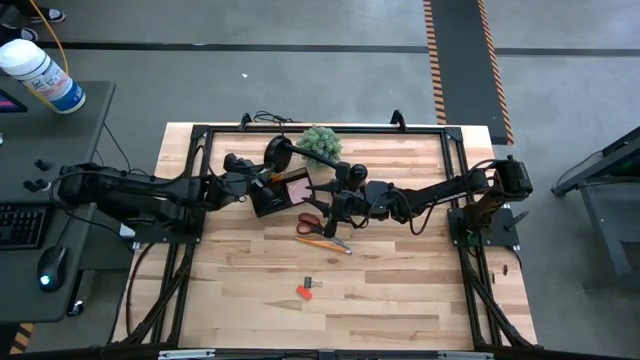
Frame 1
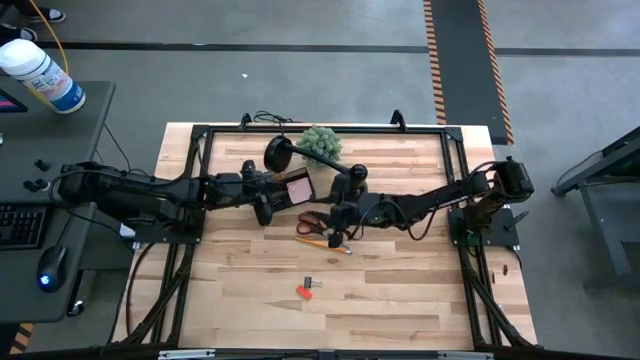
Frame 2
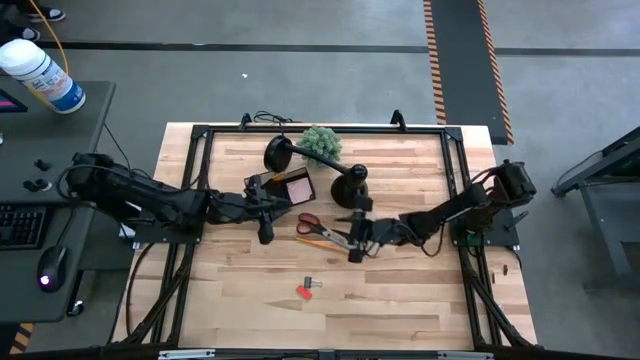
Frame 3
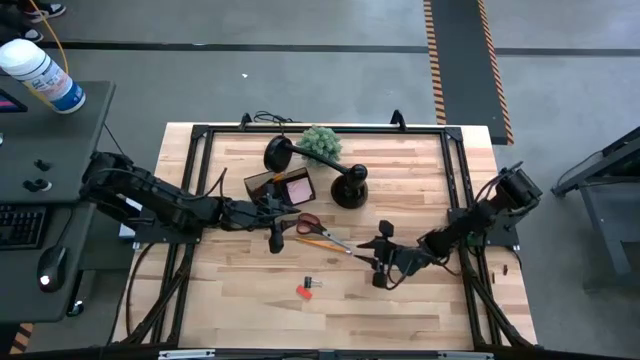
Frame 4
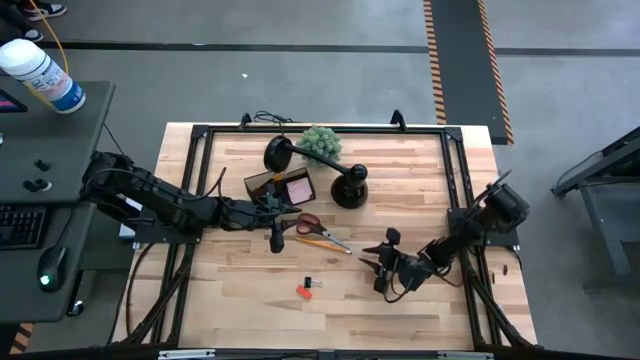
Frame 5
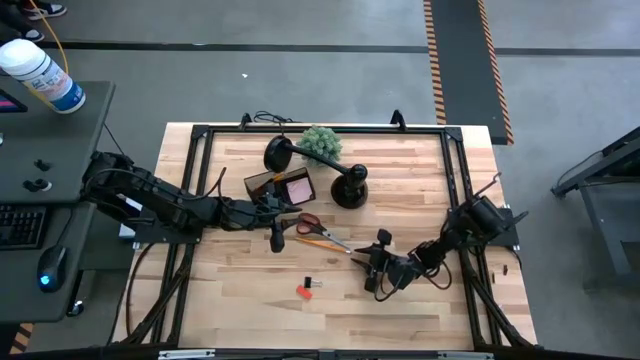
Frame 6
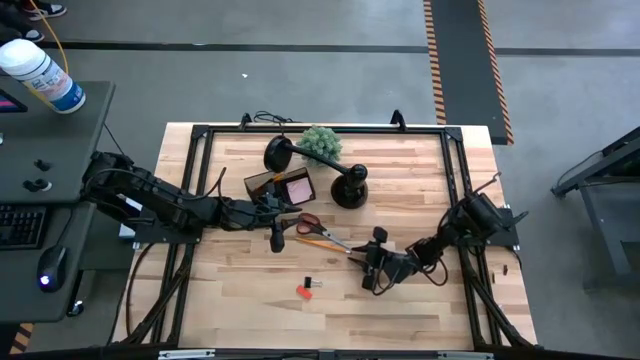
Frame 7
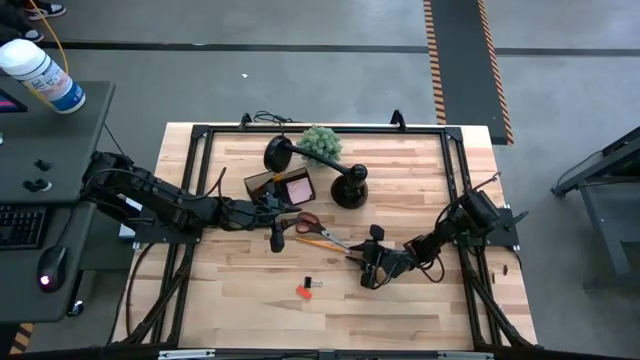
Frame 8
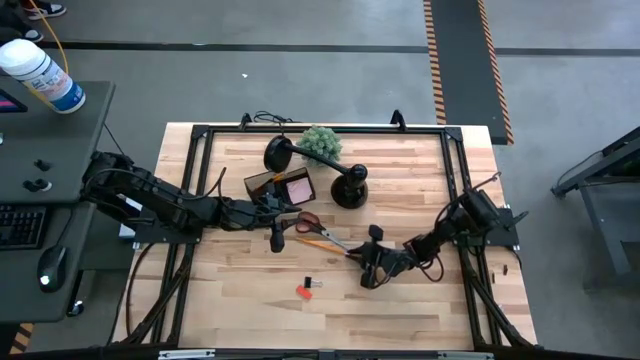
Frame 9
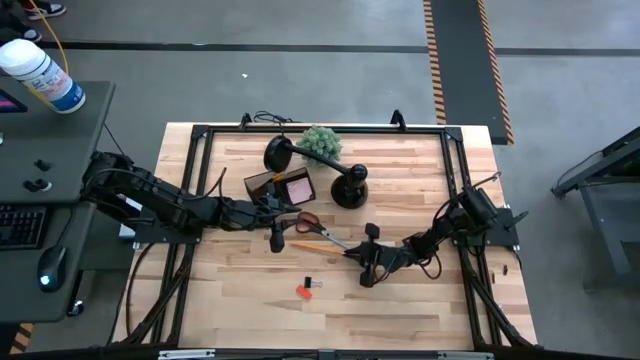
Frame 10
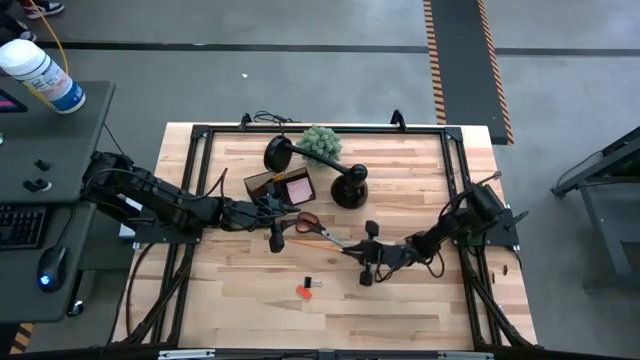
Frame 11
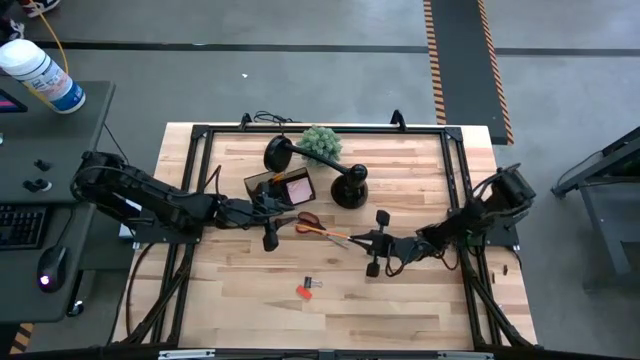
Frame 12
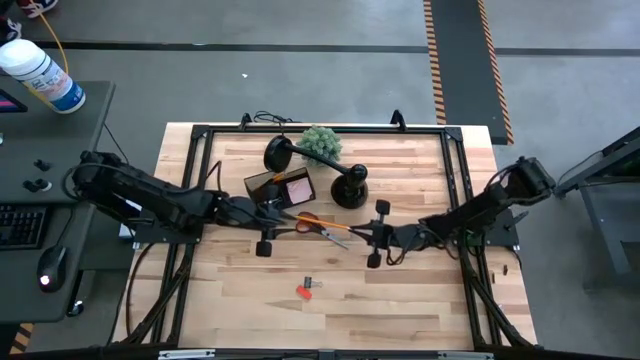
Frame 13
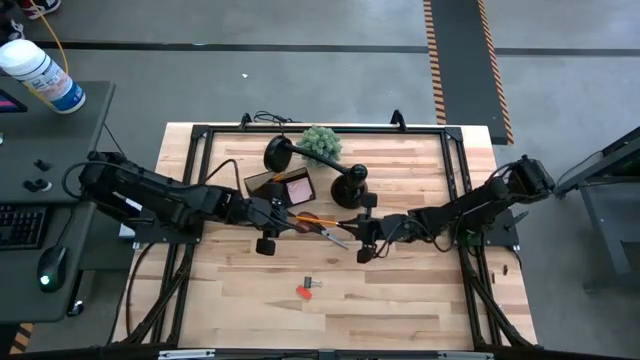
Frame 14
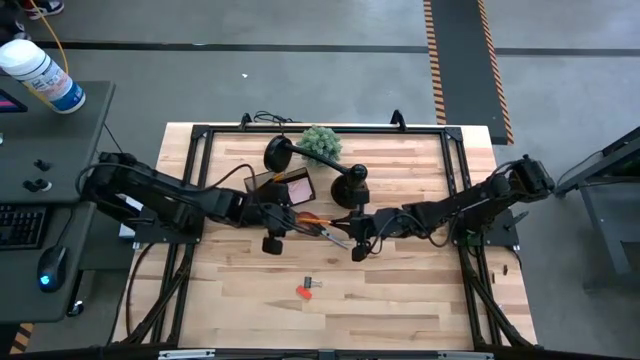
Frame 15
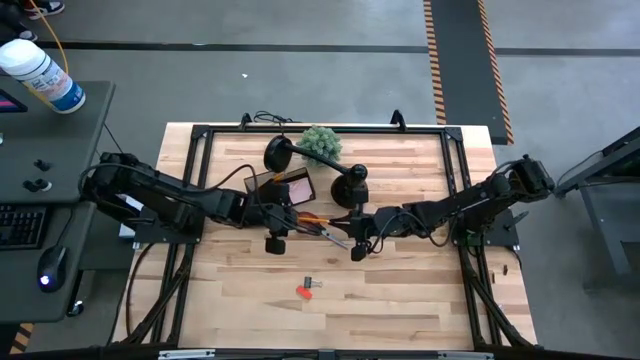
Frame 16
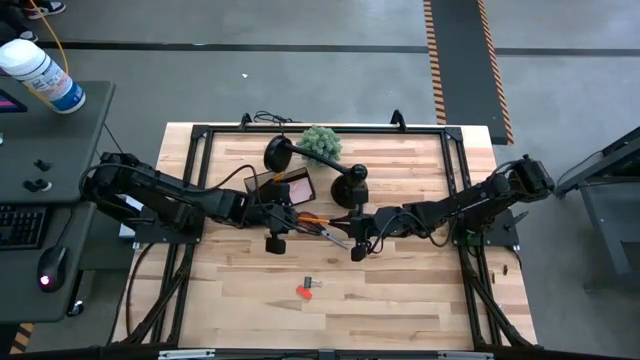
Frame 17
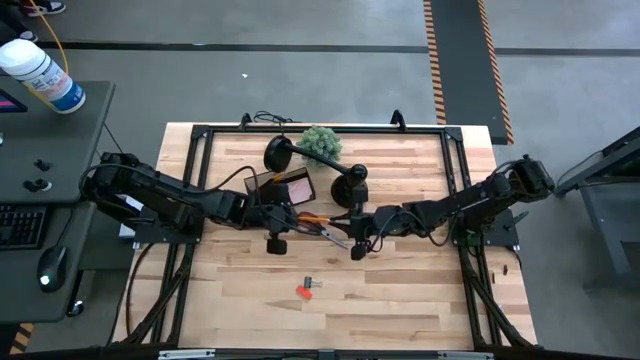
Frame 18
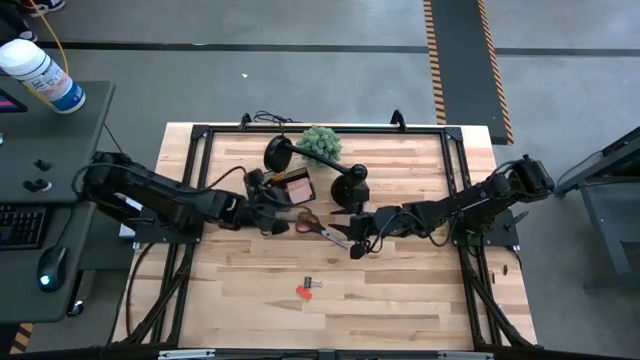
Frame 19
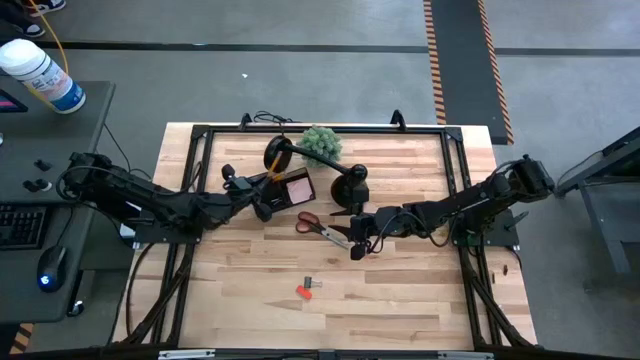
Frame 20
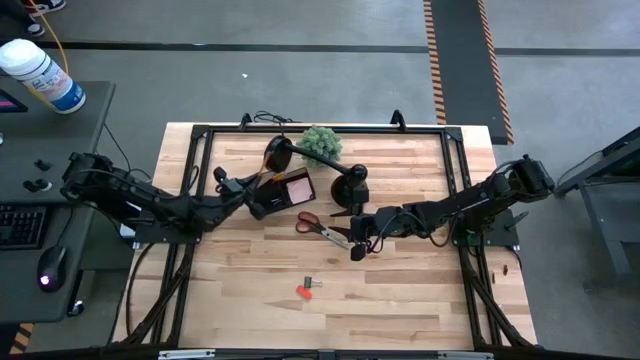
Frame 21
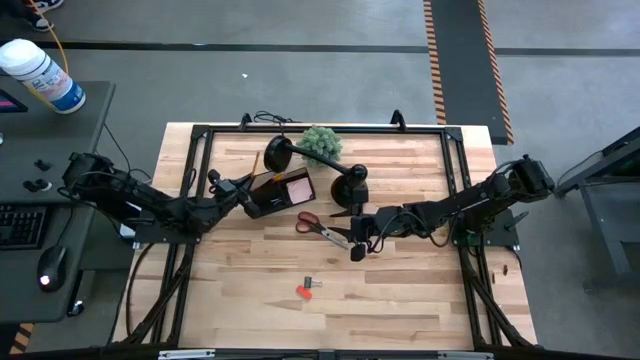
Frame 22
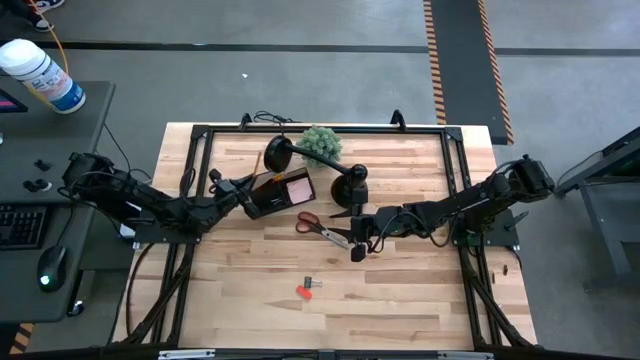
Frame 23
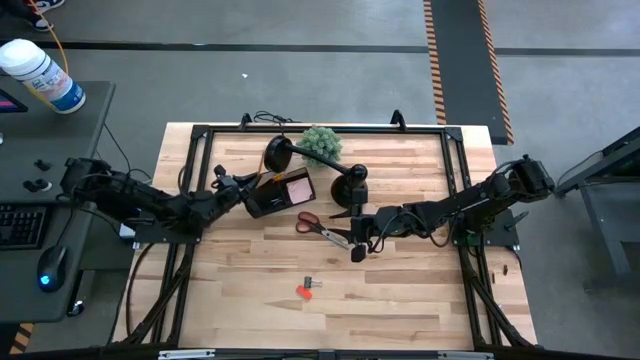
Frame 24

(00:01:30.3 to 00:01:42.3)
Task: Pick and place office supplies into organizer
Put the orange pencil into the black desk organizer

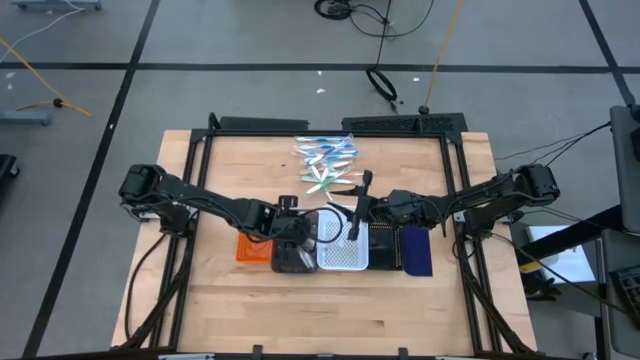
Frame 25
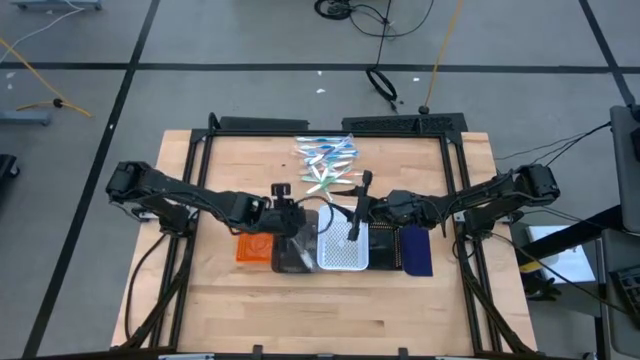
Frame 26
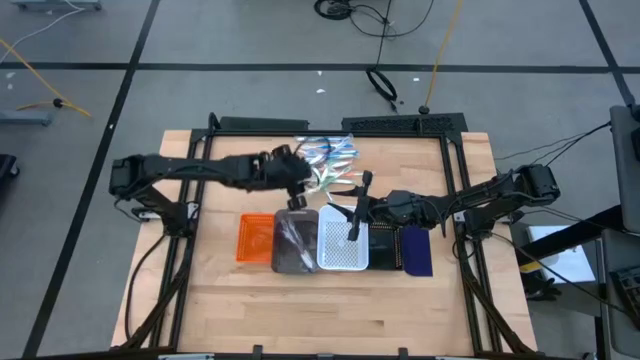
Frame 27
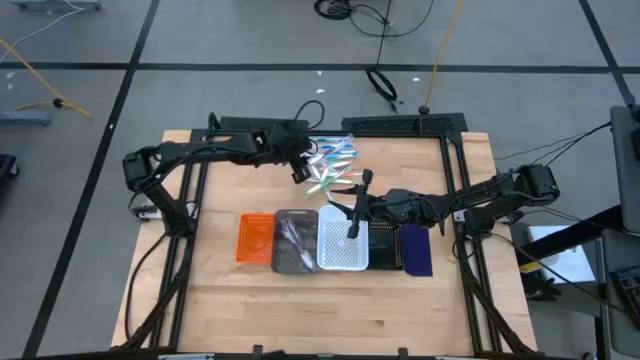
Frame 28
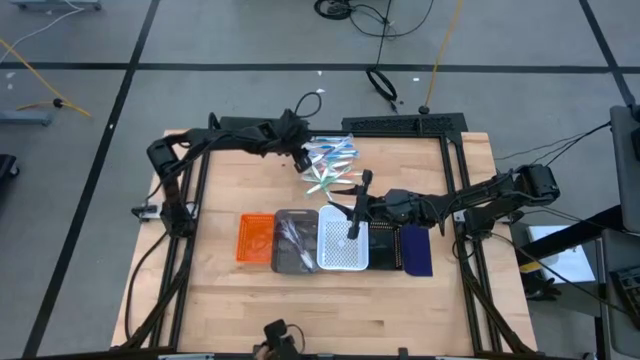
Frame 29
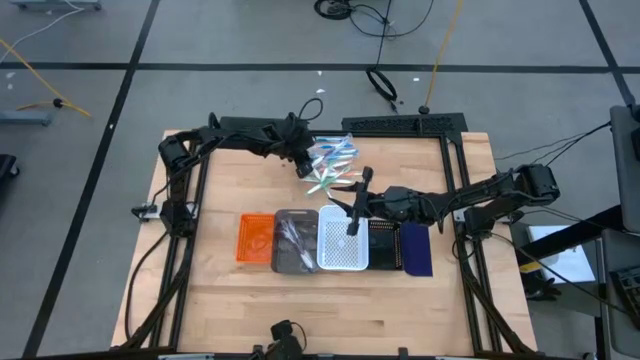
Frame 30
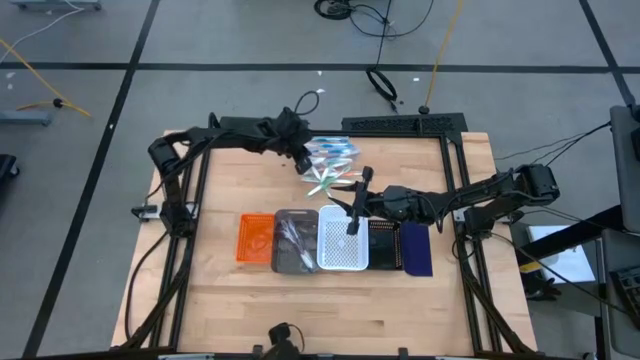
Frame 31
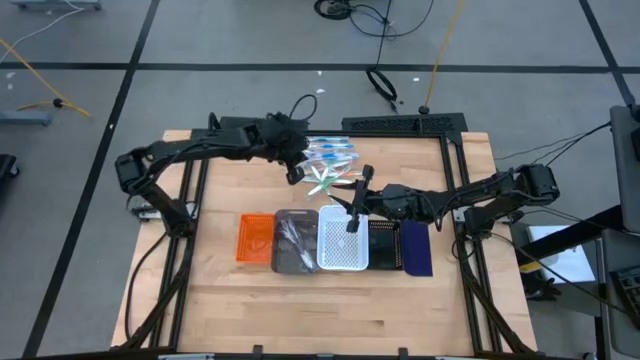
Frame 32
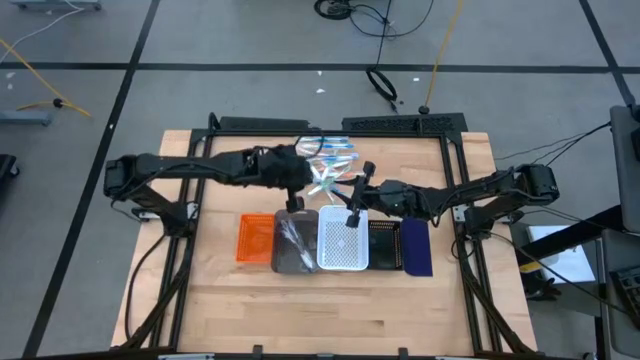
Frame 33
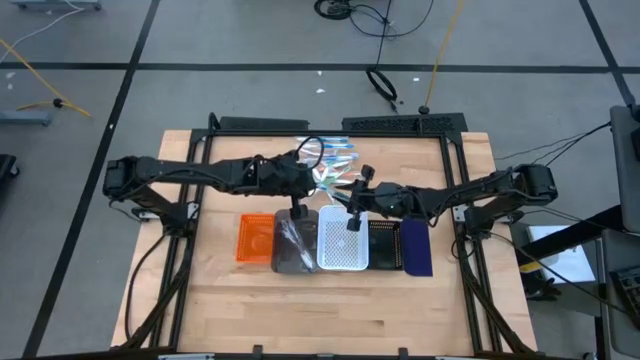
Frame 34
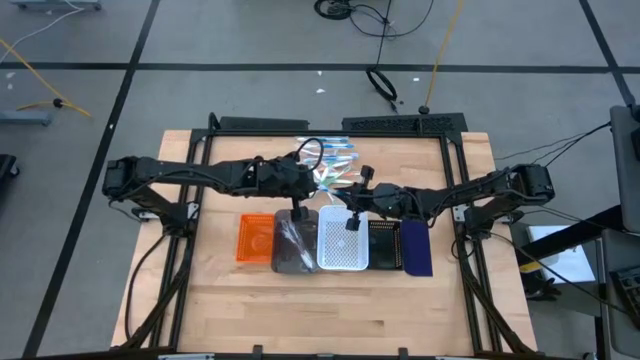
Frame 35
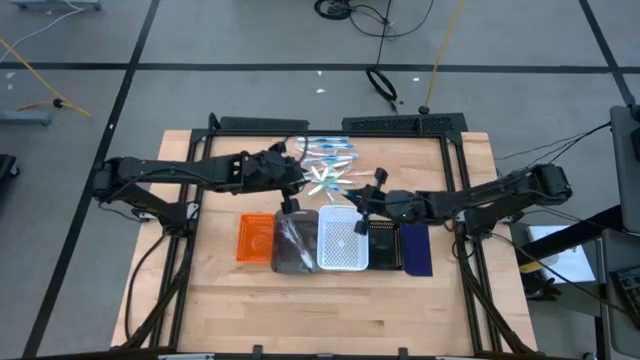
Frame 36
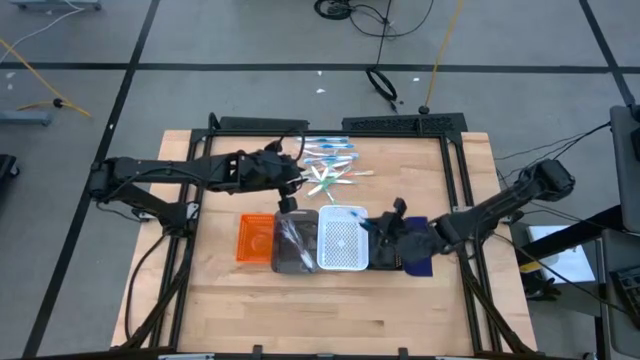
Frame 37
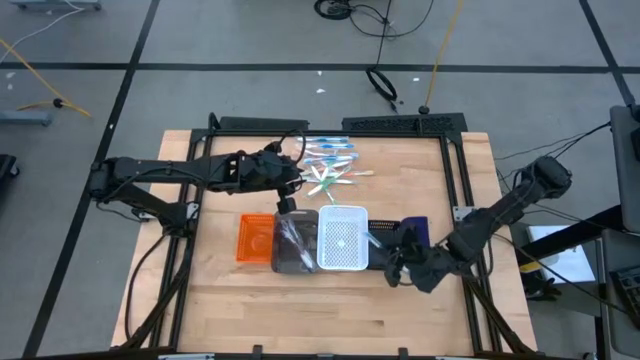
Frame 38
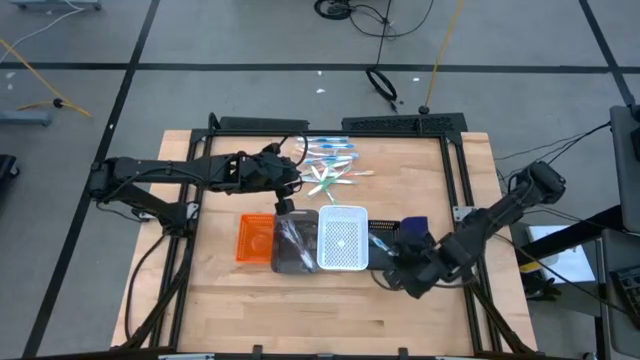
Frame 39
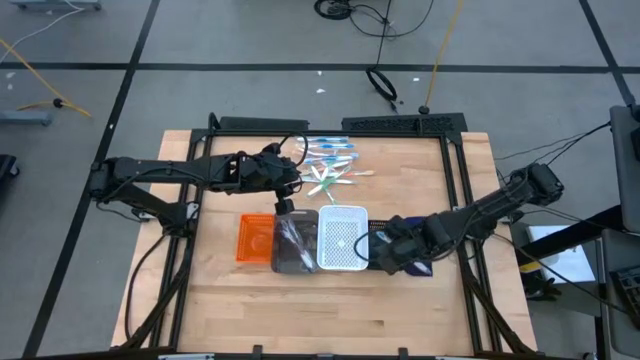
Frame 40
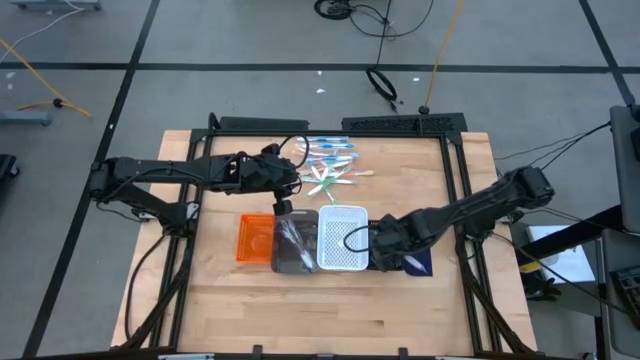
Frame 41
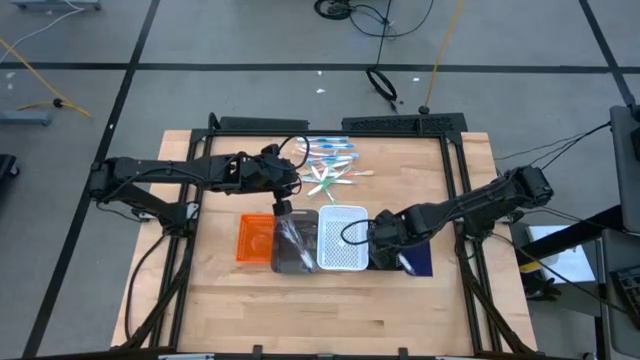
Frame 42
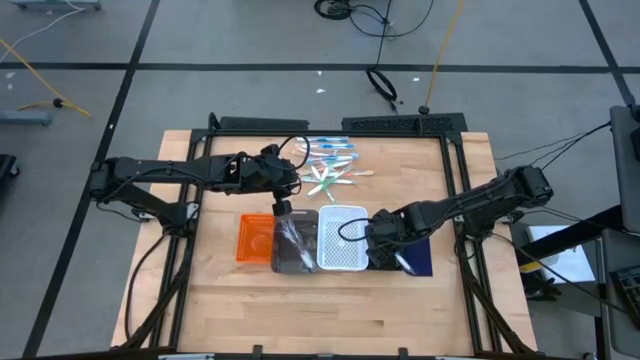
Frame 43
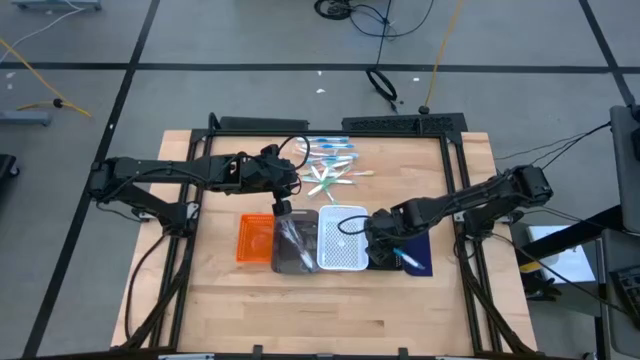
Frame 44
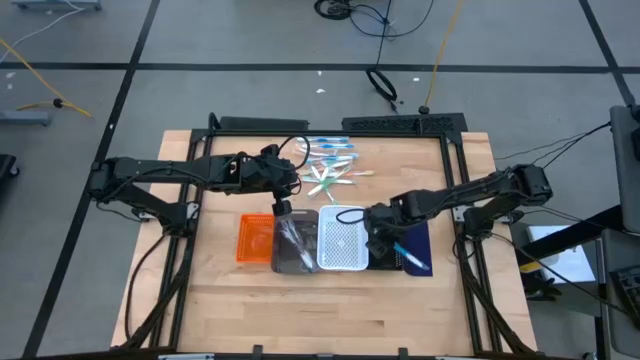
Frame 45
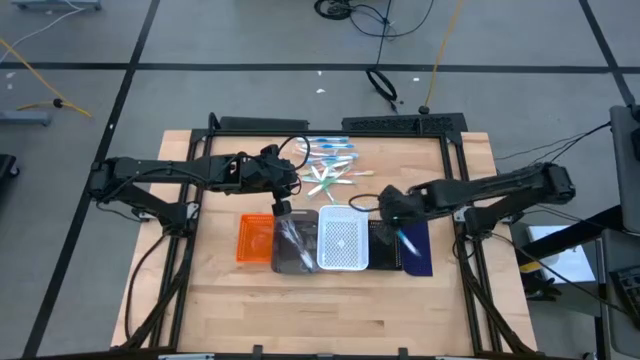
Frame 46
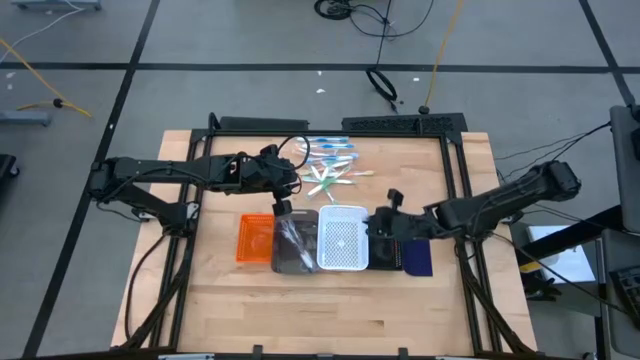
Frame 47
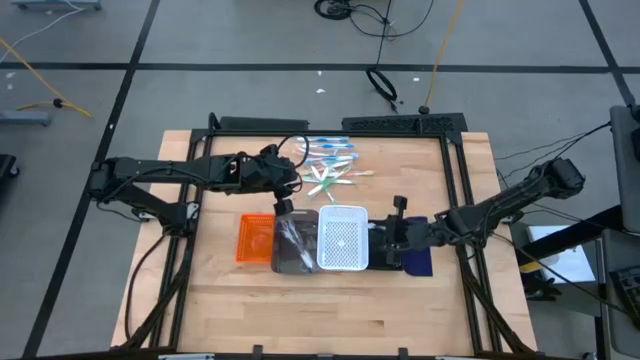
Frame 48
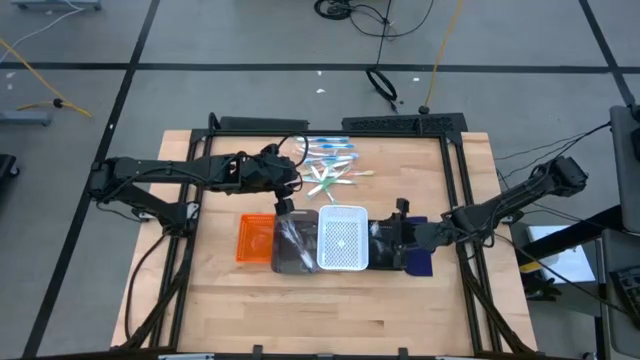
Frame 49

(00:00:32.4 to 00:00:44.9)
Task: Pick & Place Toothbrushes
Put the blue toothbrush into the right black bin
